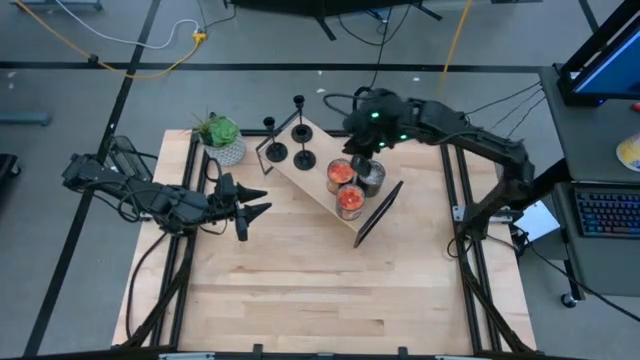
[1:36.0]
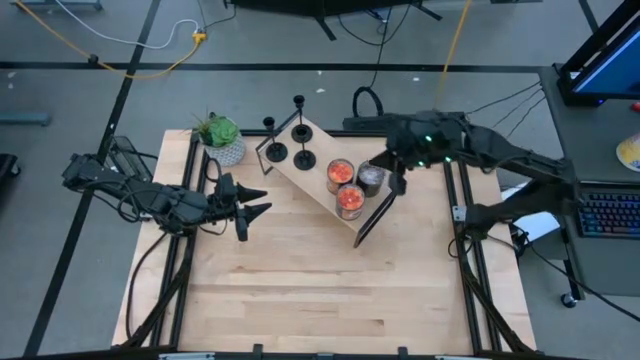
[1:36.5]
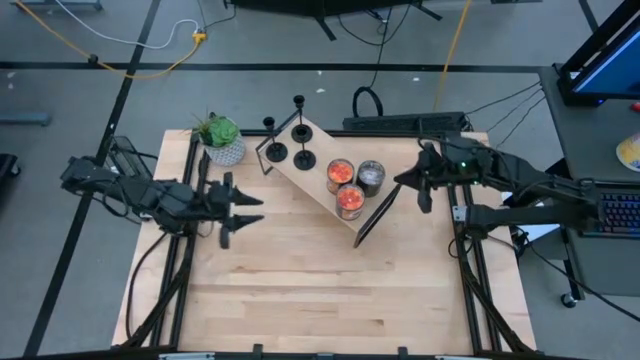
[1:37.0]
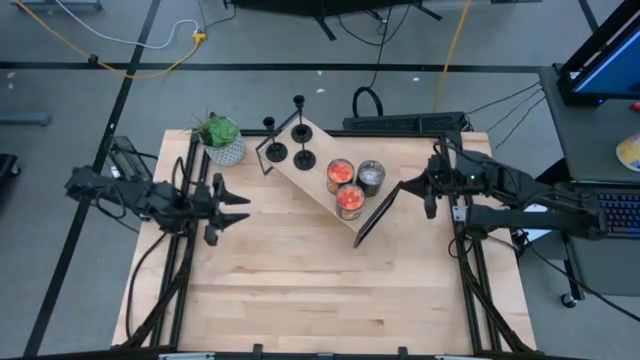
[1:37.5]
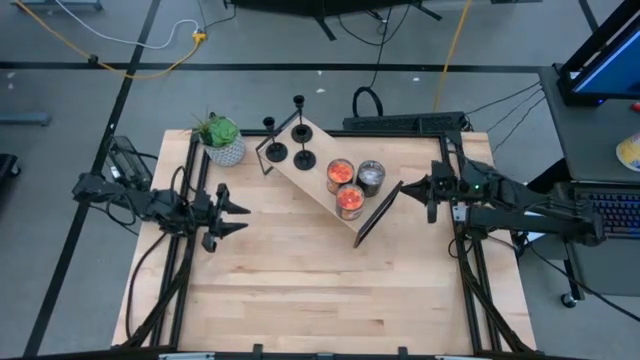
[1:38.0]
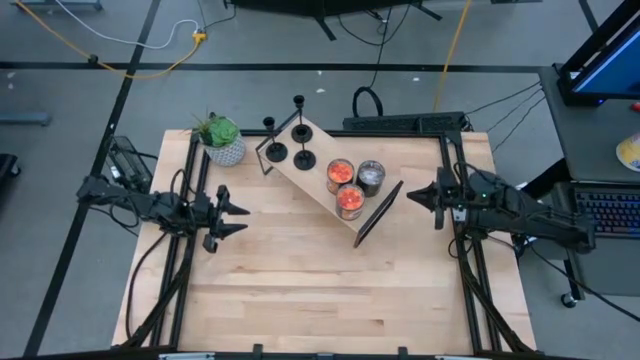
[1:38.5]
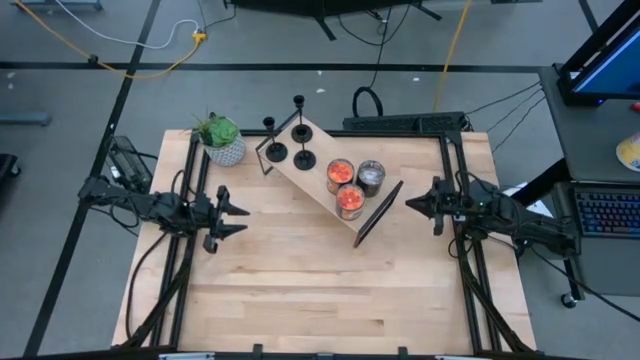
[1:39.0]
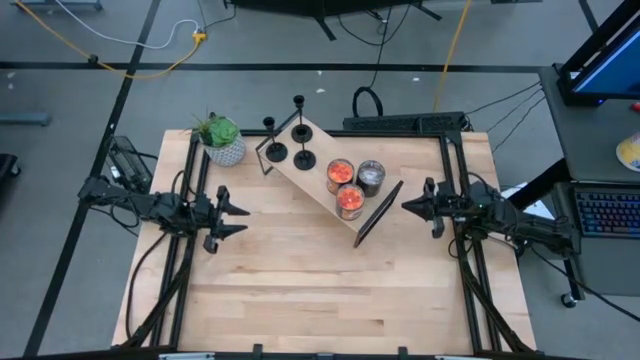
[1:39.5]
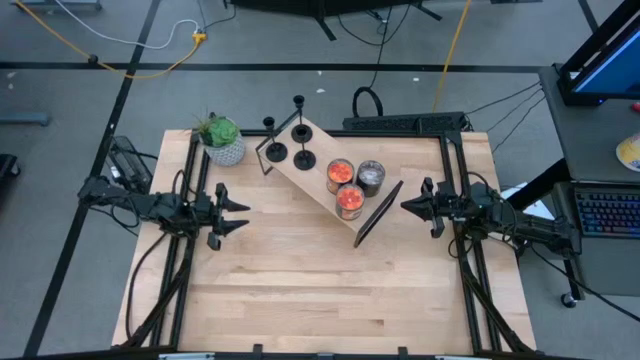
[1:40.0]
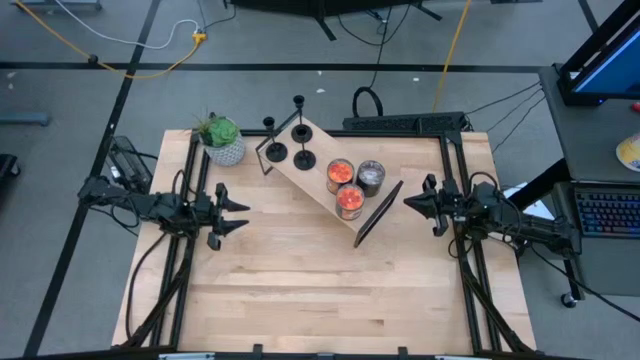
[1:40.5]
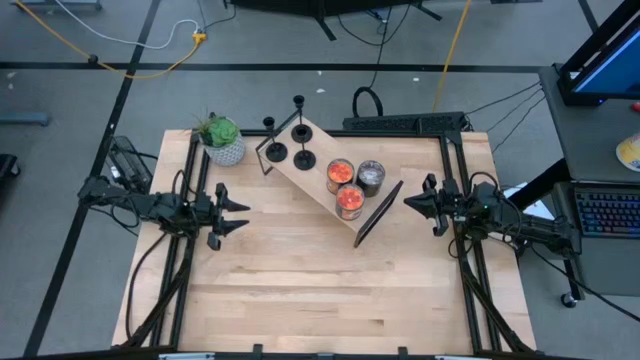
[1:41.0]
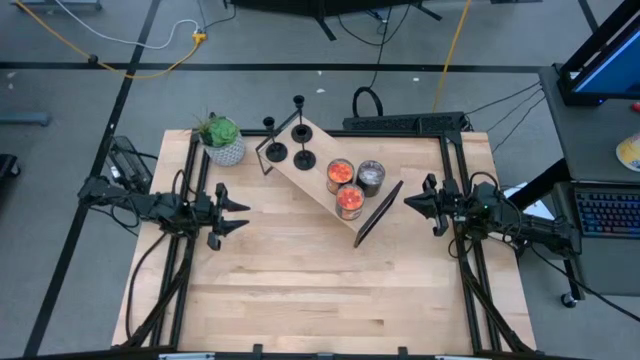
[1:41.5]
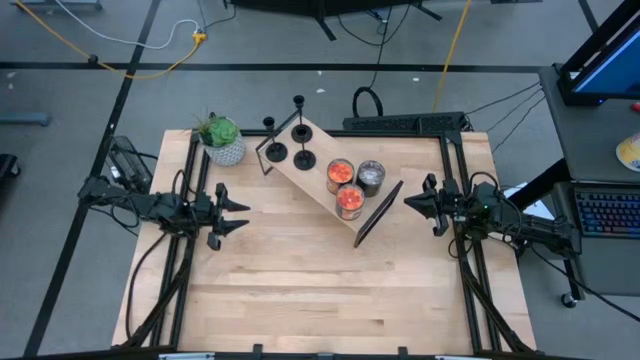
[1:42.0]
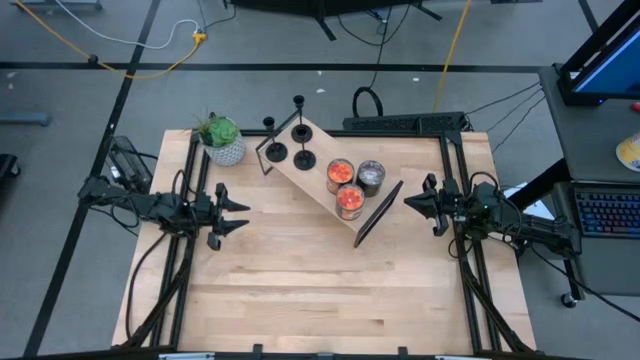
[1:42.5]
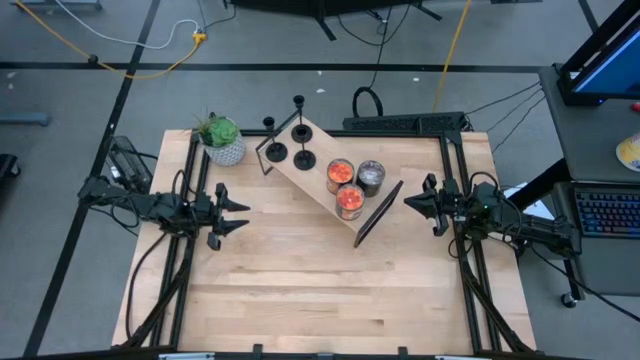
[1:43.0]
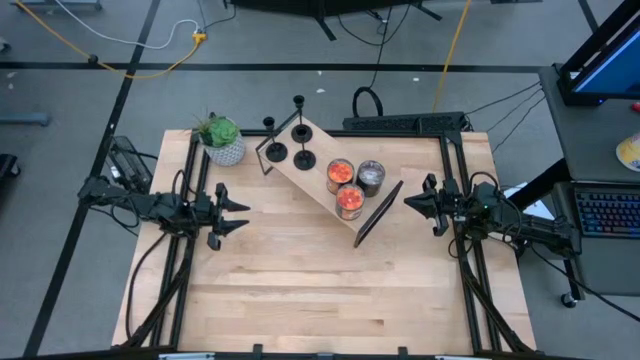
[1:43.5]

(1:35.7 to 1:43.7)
Task: Pick & Place candle stick holders
Return to Home Position

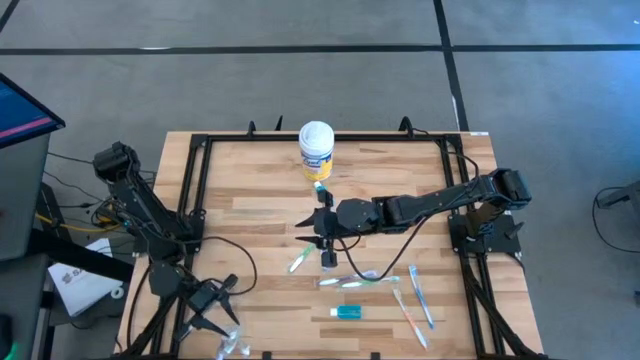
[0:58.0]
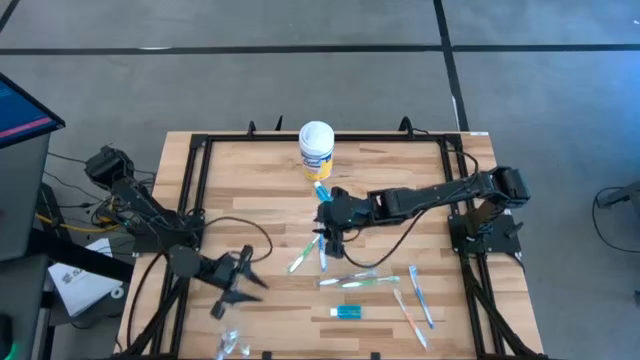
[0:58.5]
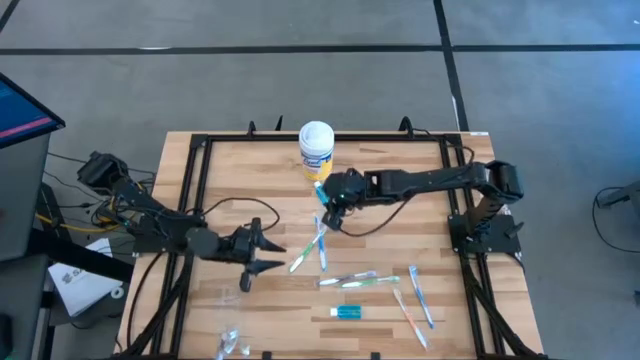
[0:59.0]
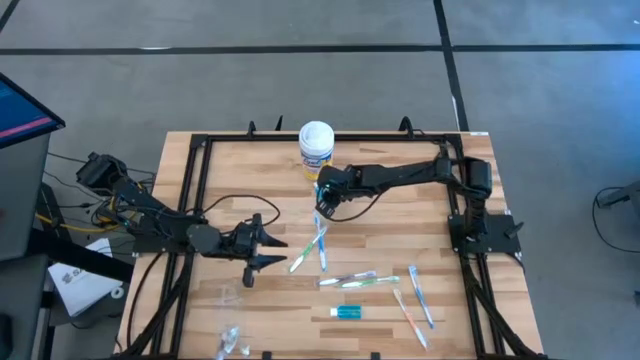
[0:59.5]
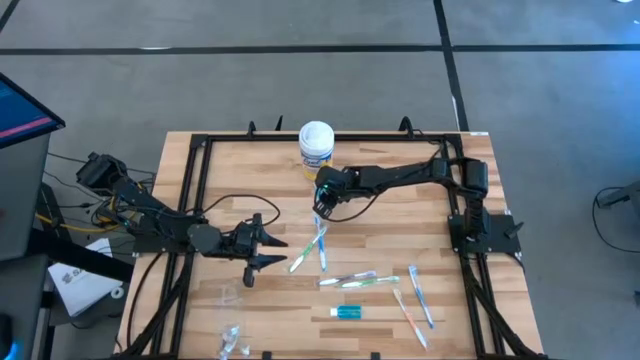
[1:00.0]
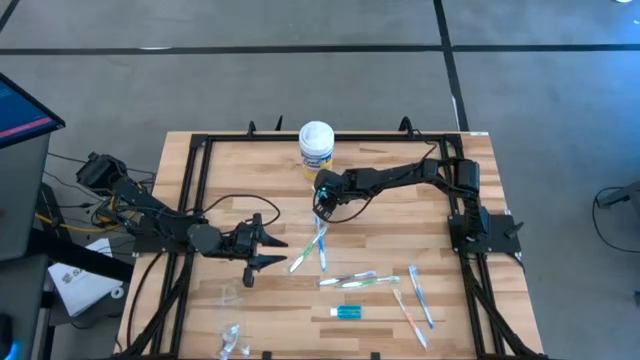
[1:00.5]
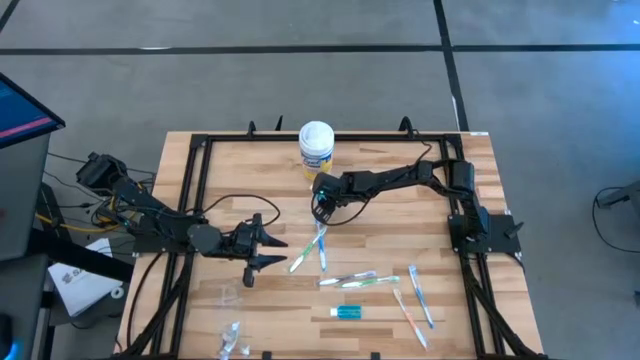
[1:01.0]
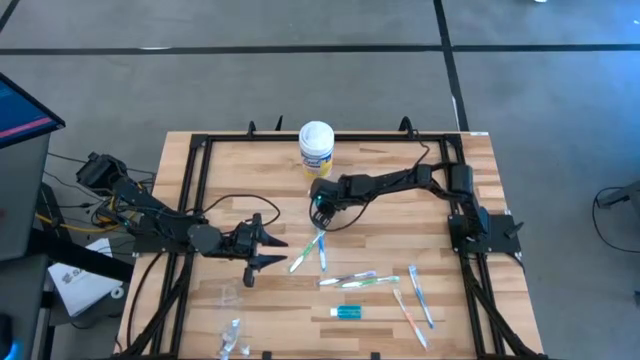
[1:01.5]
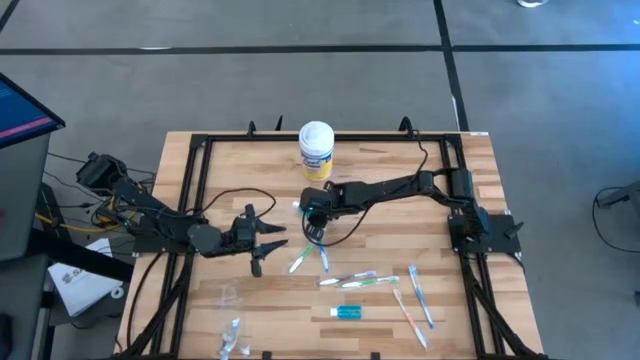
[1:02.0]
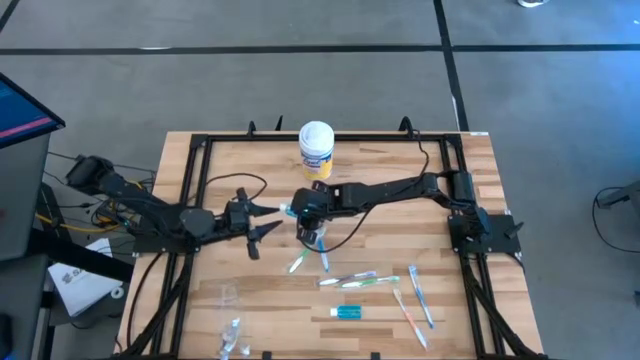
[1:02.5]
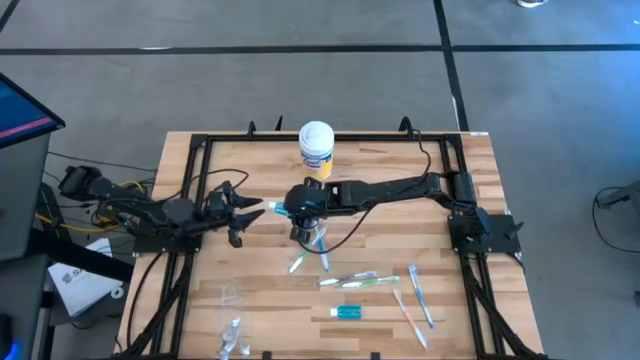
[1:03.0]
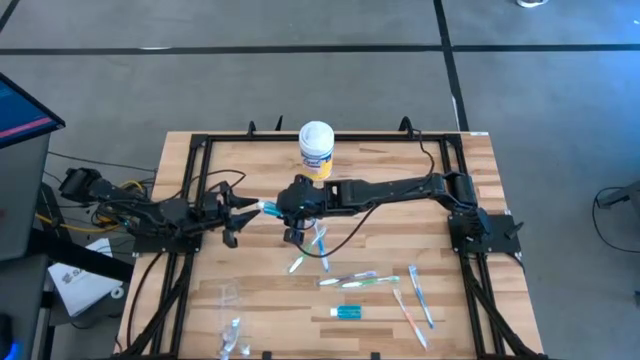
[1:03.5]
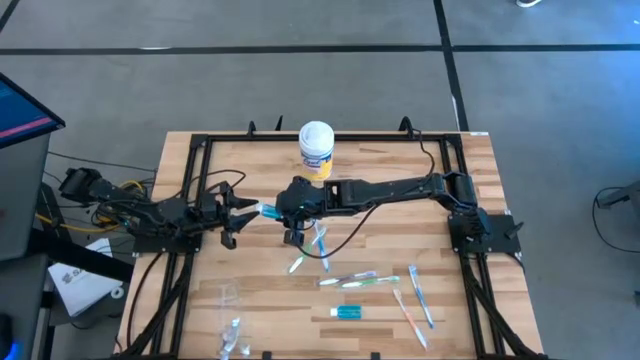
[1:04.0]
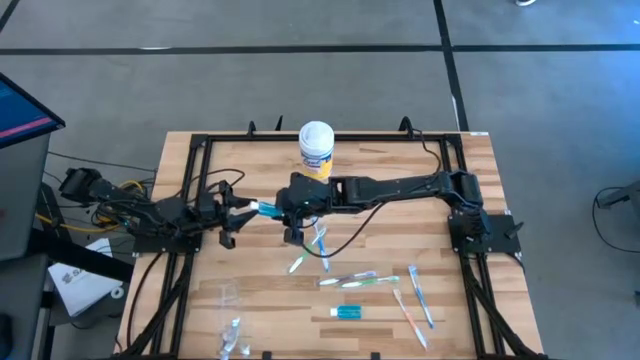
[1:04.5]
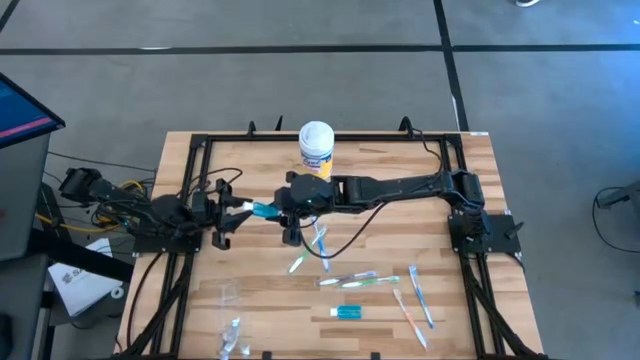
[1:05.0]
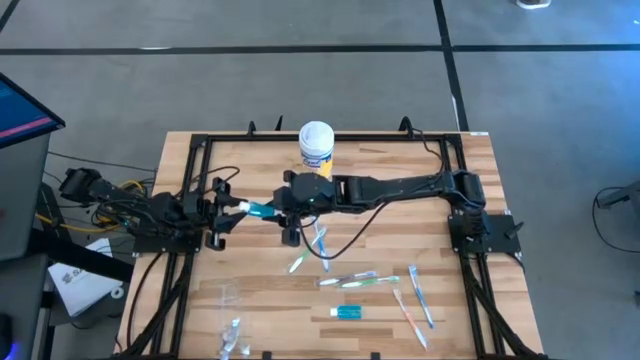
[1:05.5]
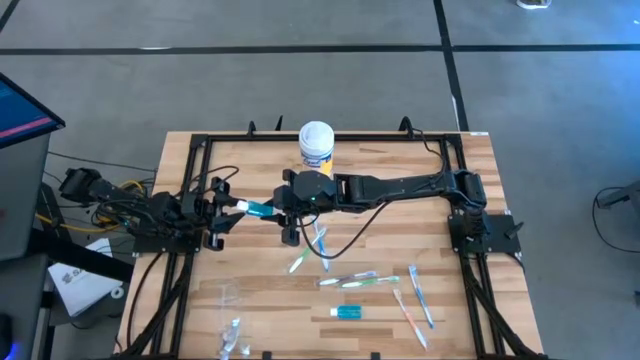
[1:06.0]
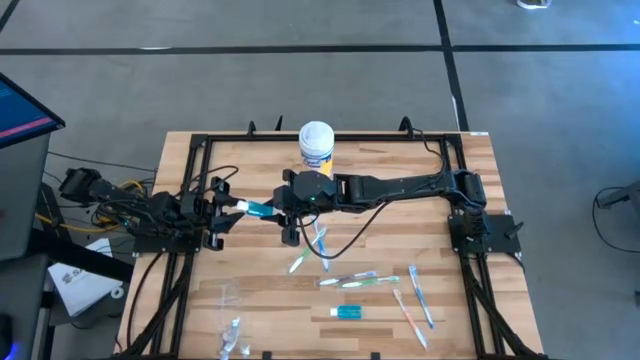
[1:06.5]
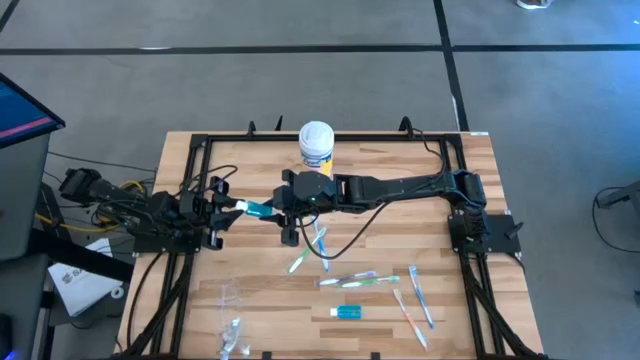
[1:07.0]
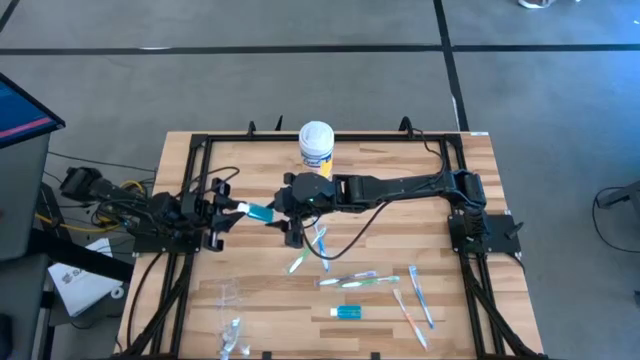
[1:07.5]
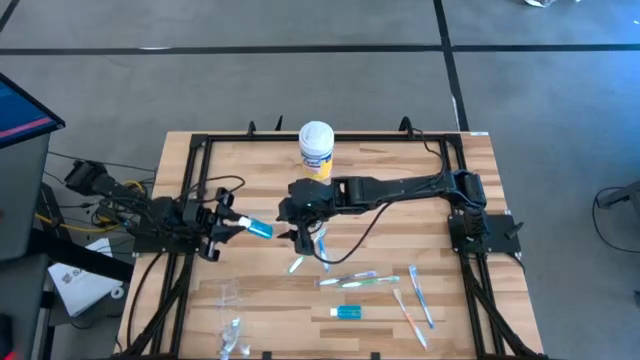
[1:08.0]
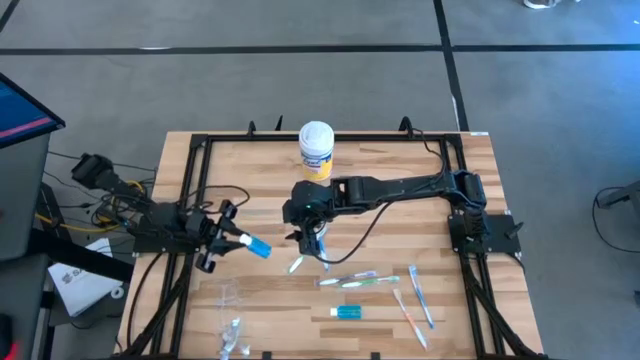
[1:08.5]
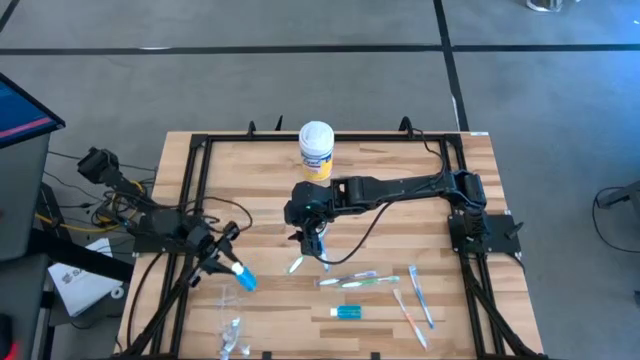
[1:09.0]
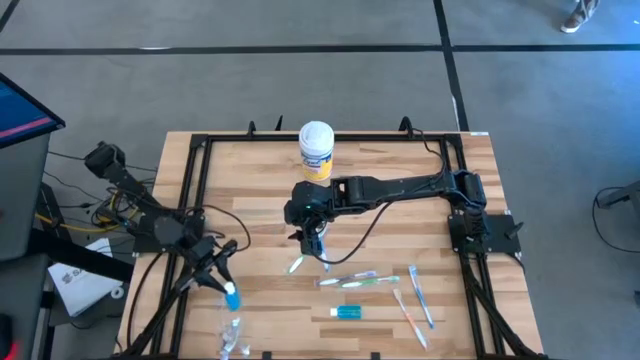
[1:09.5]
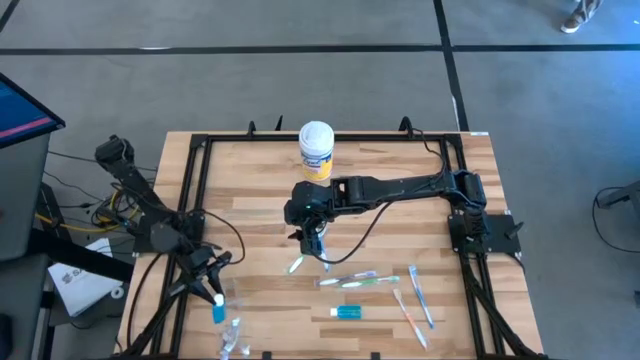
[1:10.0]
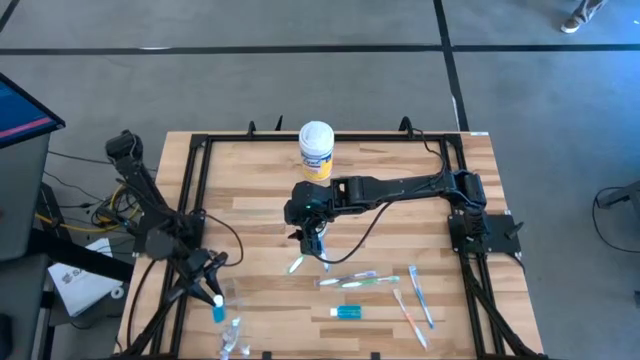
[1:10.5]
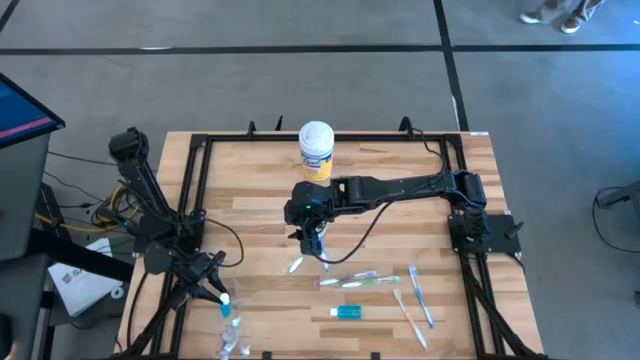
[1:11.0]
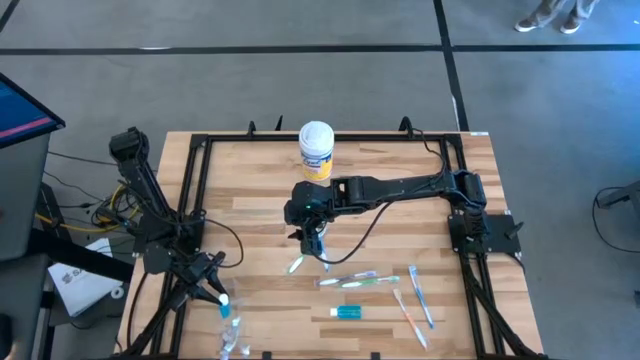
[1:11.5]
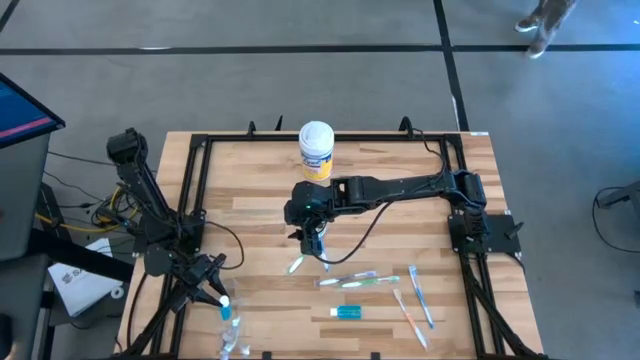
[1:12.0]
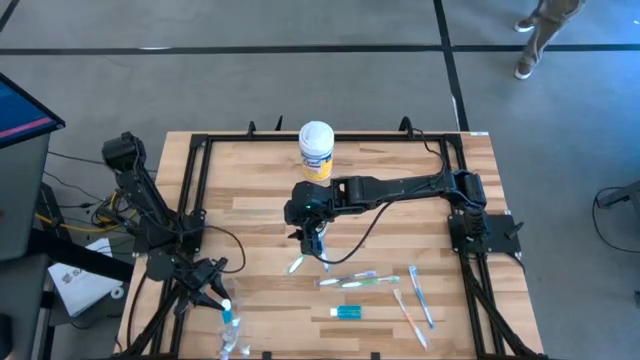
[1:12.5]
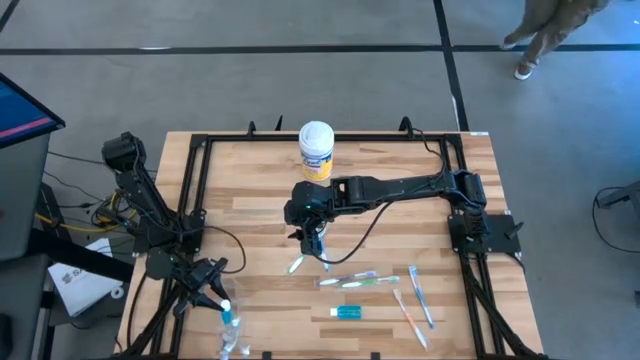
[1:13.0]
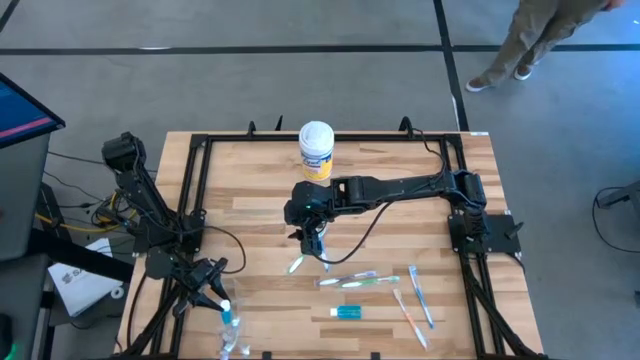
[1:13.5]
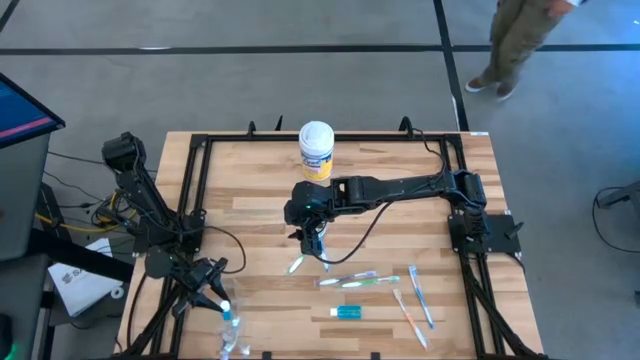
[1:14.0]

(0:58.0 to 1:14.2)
Task: Pick & Place toothbrushing station
Put the top blue mouthwash into the transparent organizer
